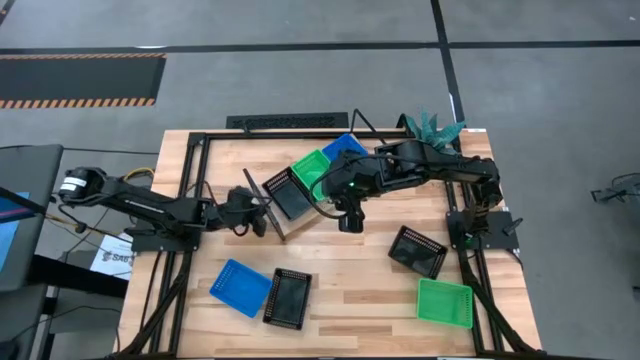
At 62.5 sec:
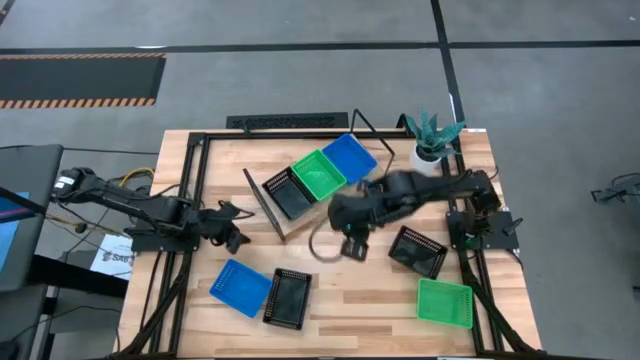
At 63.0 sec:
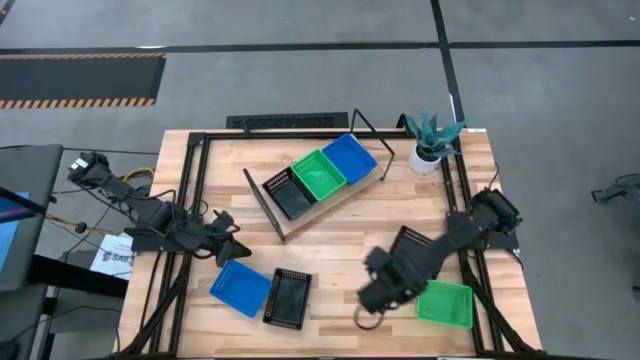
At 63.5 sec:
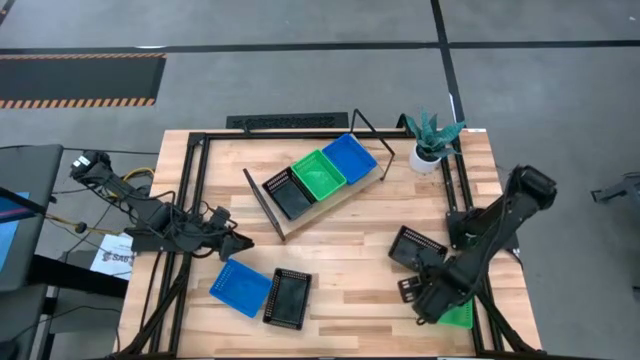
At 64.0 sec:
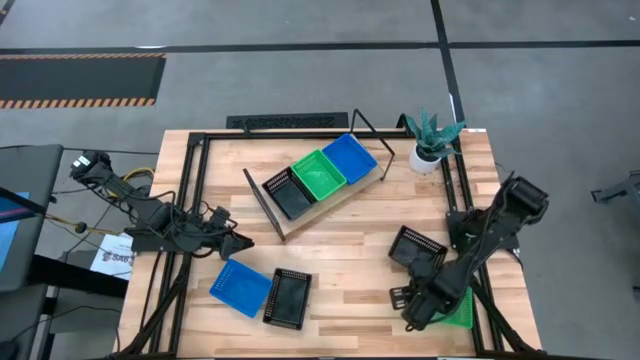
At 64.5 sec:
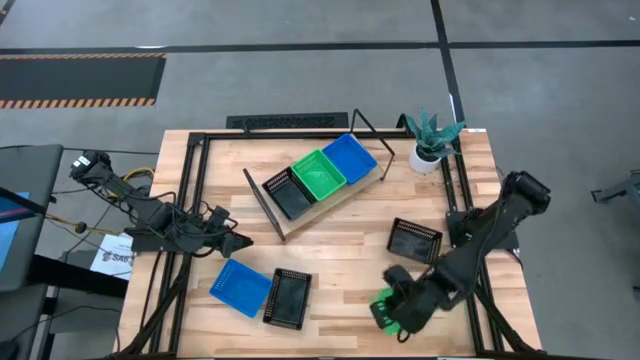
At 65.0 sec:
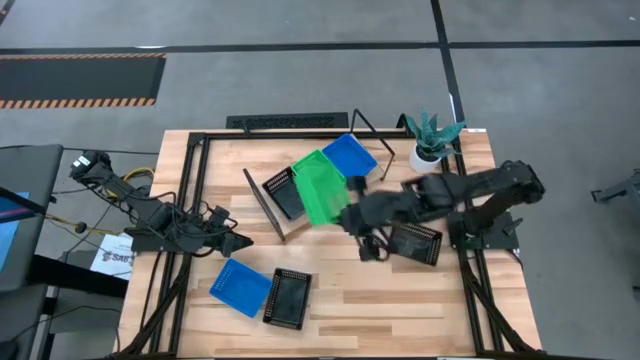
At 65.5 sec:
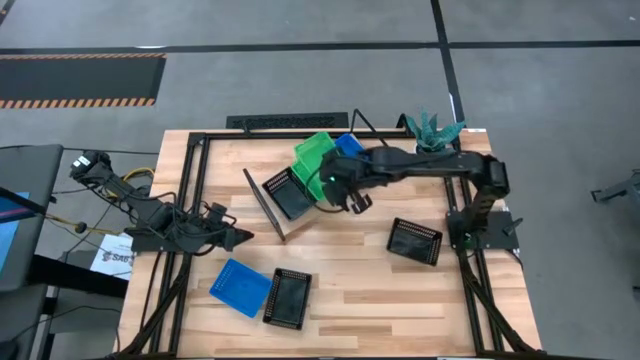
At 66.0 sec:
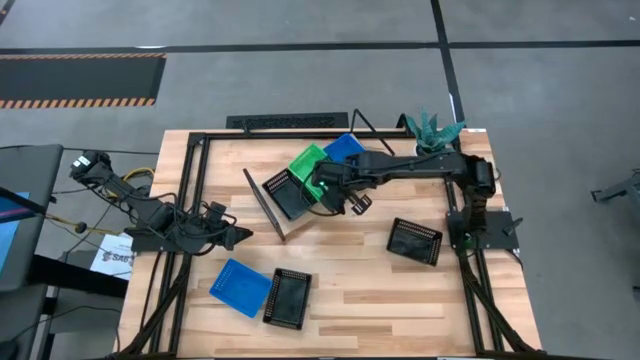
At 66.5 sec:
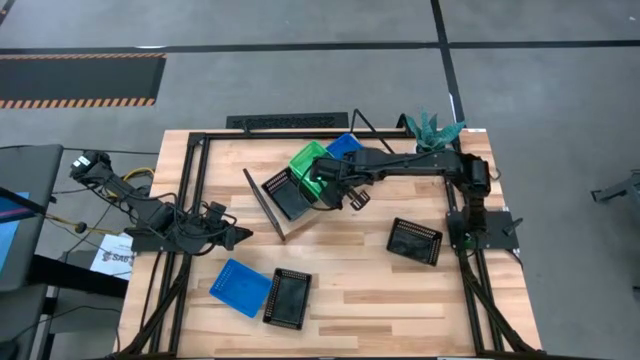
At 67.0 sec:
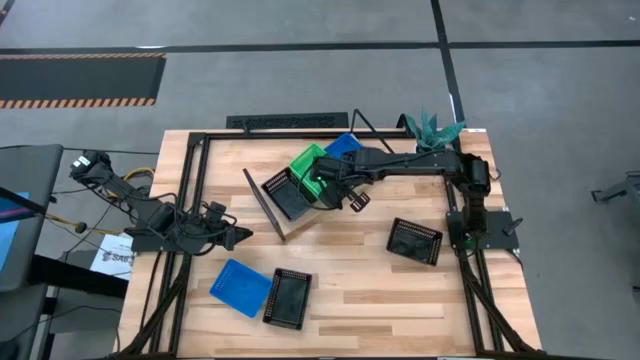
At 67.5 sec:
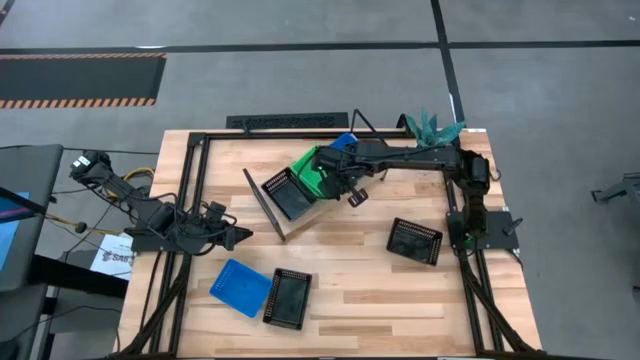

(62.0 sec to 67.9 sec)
Task: Stack baskets on shelf by color
Stack the green bin on top of the other green bins on the shelf

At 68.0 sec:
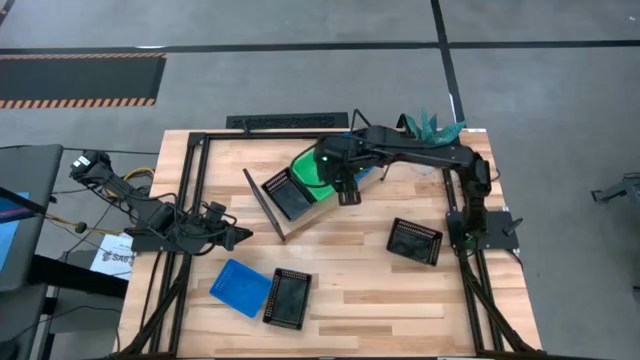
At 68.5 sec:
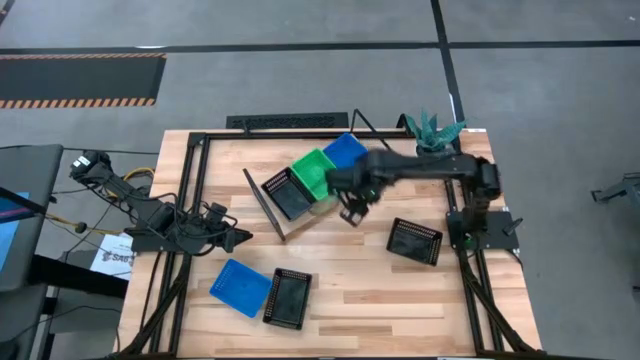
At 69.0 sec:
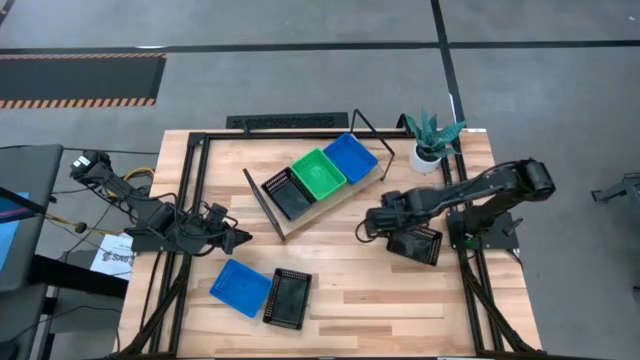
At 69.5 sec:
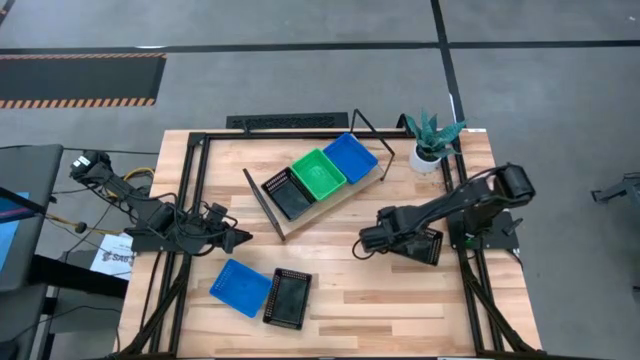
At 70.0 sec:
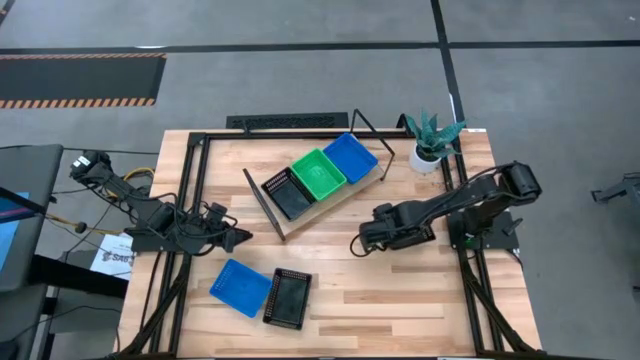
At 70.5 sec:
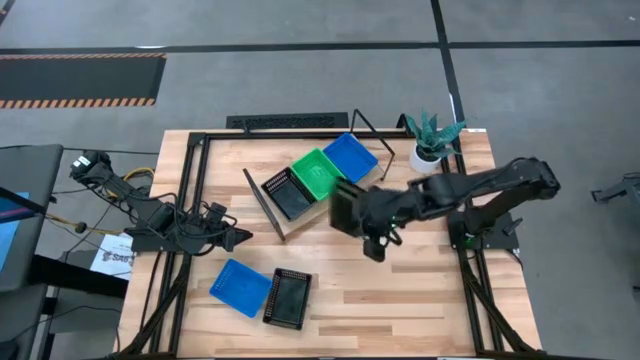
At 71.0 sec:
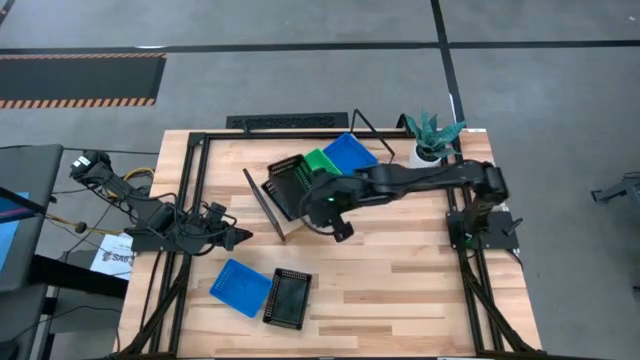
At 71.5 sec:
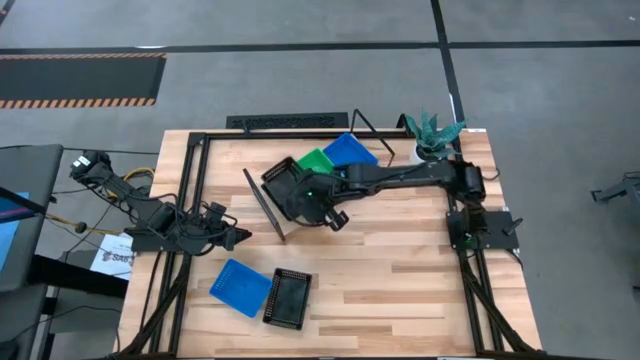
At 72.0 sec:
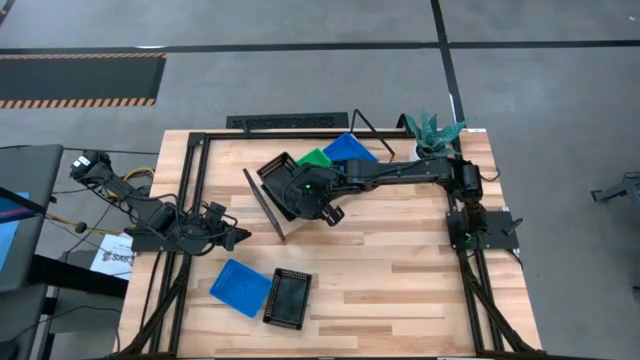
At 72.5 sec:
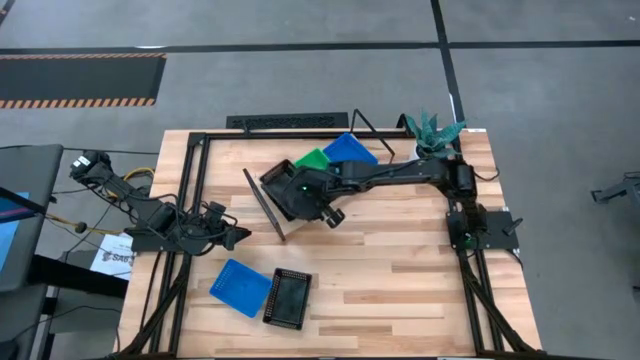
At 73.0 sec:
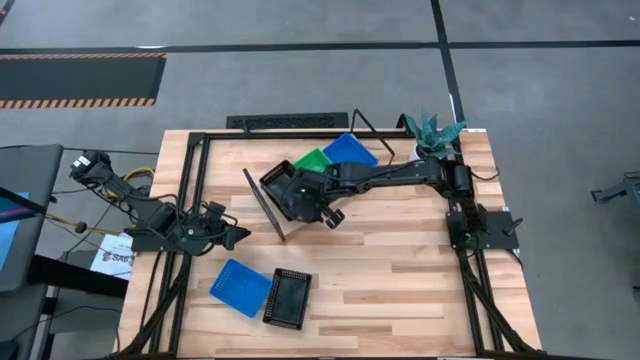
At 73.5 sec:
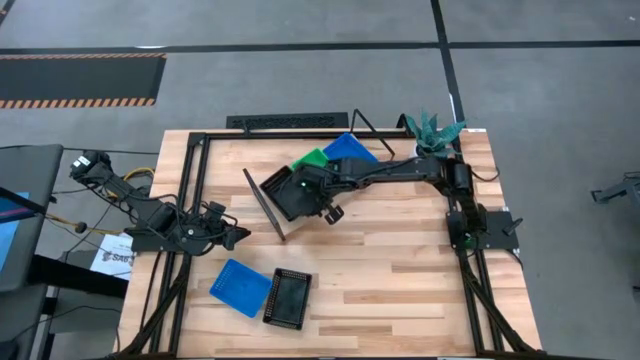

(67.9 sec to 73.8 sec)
Stack the top black bin on top of the other black bin on the shelf

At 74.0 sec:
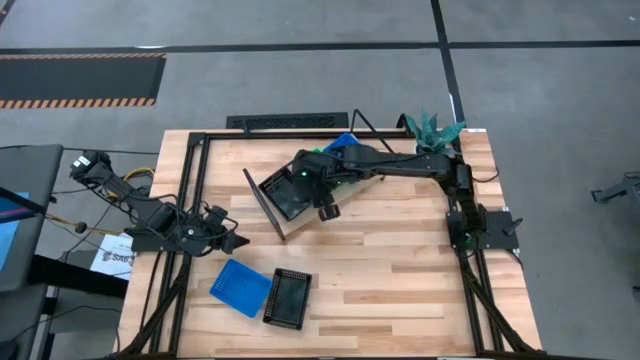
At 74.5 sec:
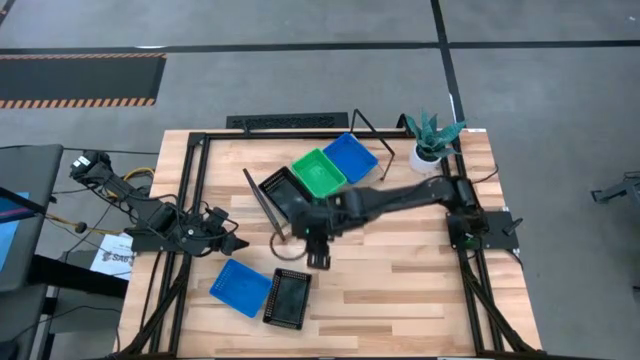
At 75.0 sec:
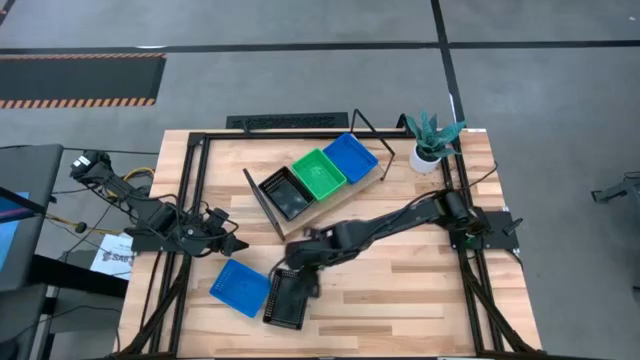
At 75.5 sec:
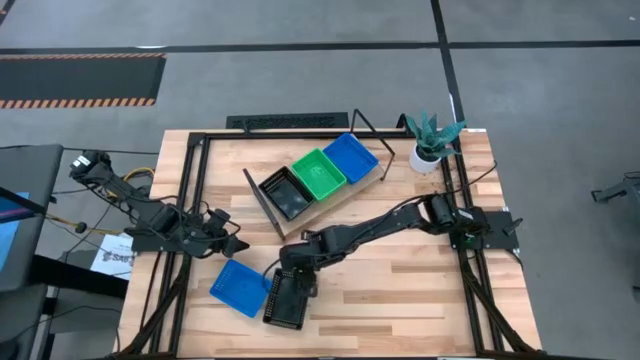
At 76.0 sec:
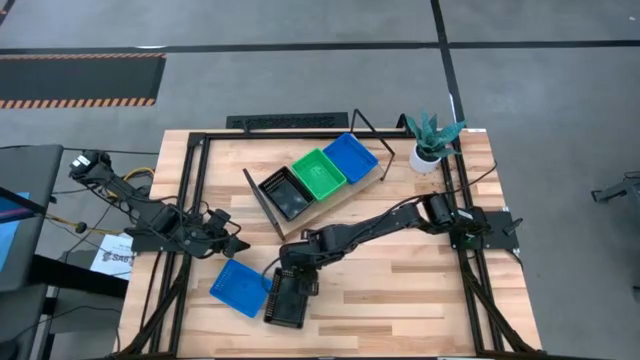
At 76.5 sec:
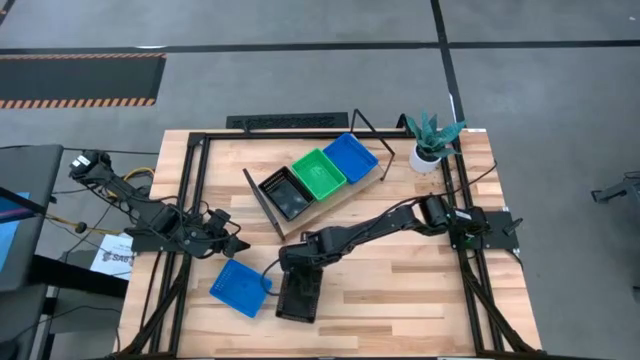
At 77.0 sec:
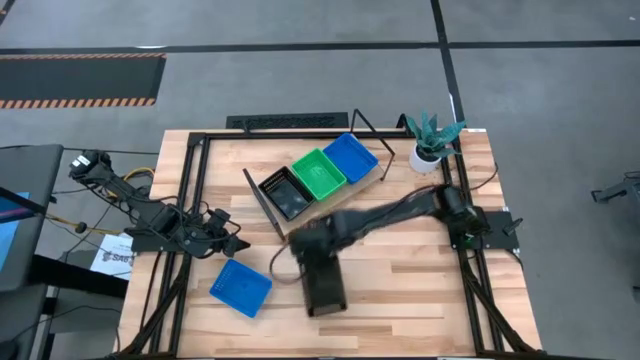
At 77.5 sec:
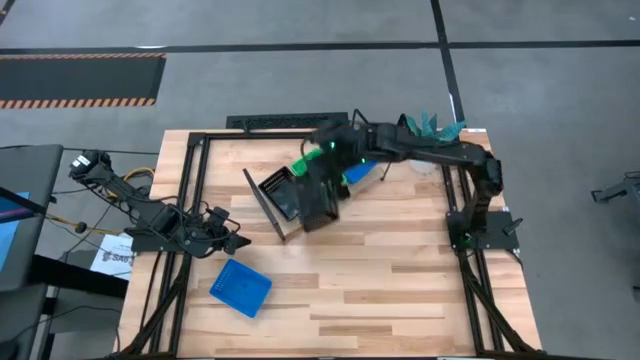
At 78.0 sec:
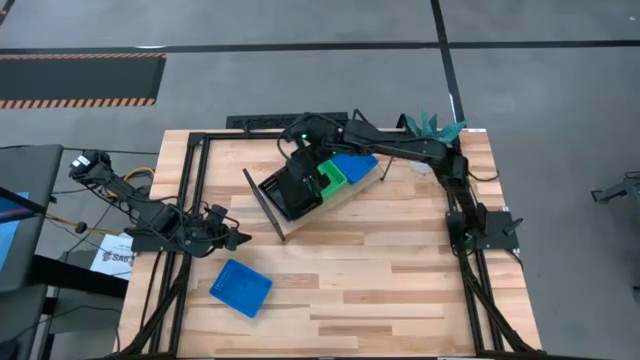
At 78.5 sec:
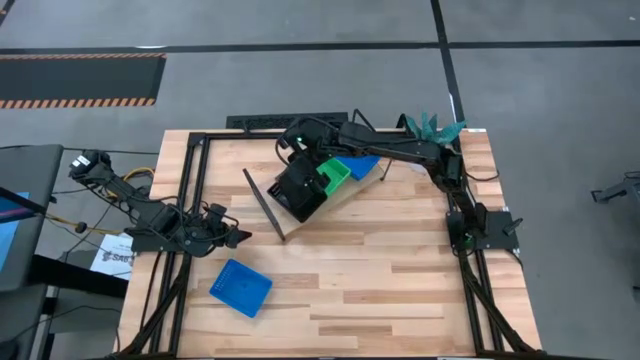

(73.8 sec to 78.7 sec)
Stack the black bin on top of the other black bins on the shelf
